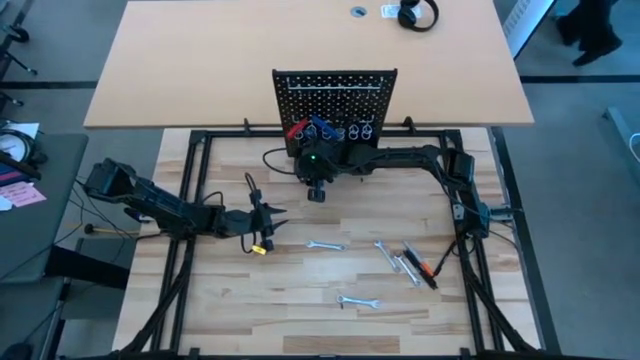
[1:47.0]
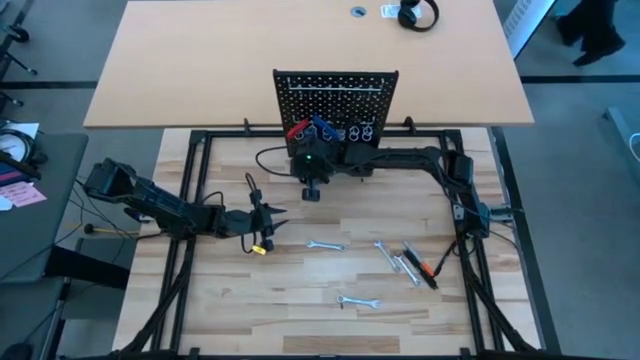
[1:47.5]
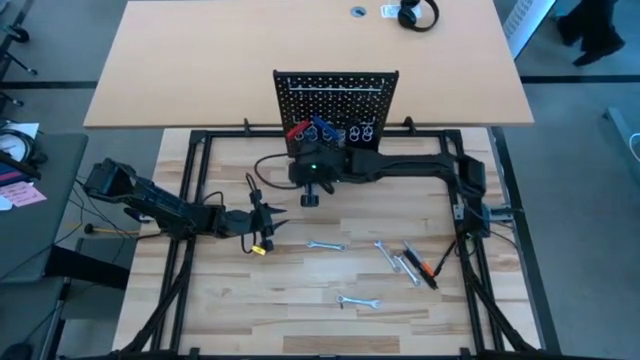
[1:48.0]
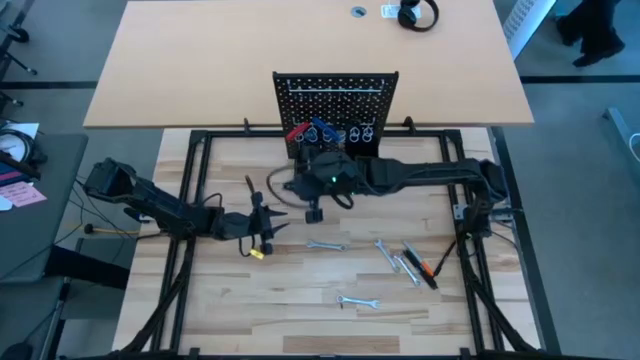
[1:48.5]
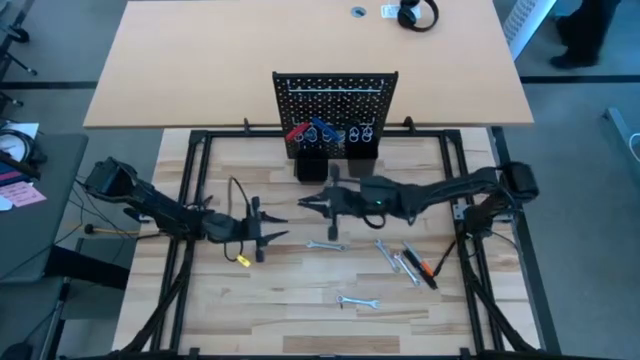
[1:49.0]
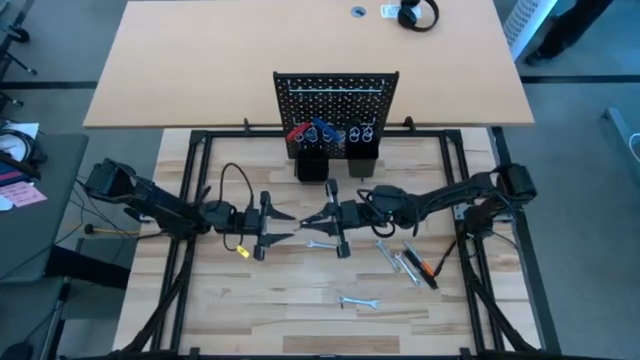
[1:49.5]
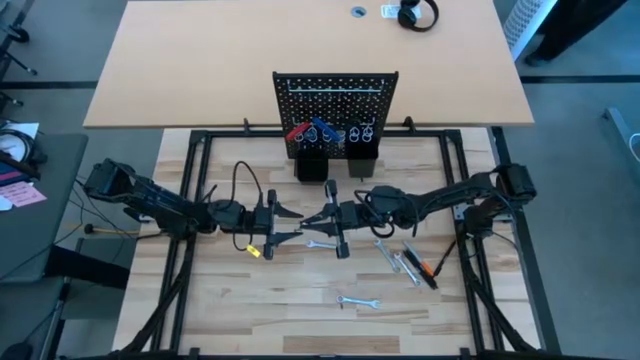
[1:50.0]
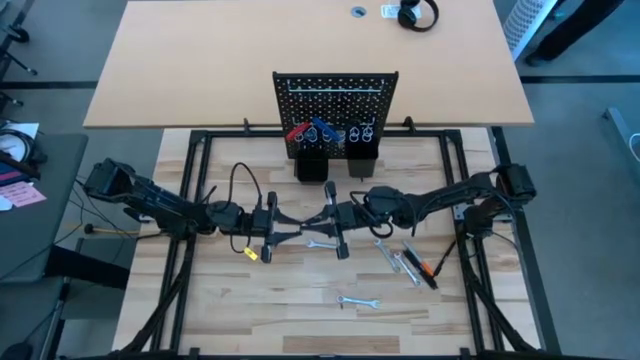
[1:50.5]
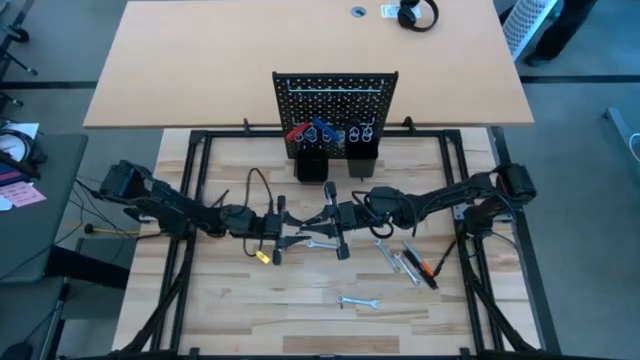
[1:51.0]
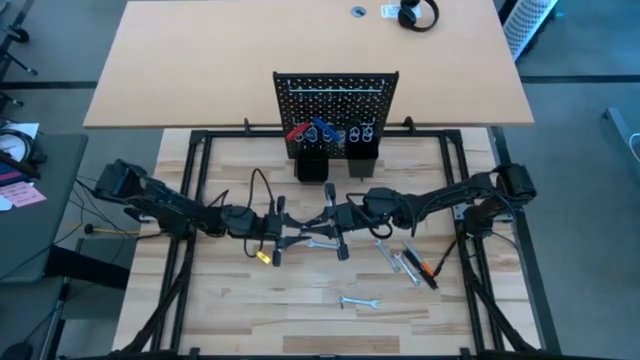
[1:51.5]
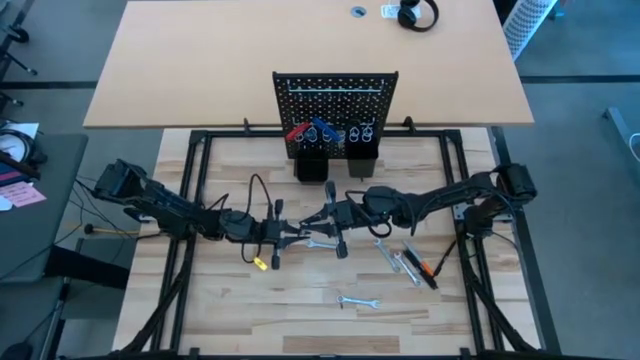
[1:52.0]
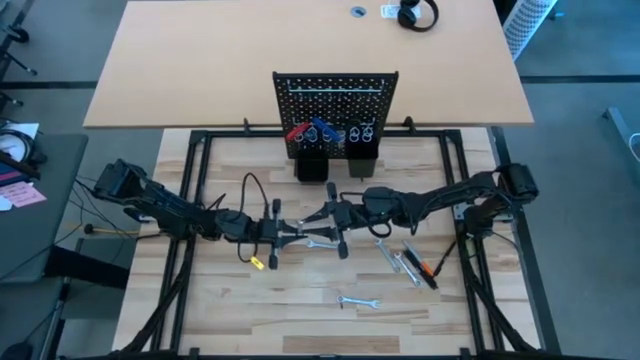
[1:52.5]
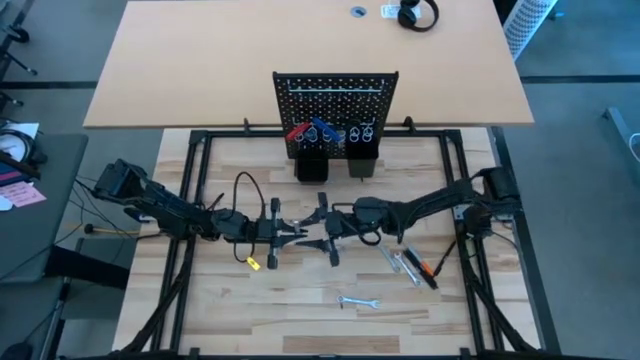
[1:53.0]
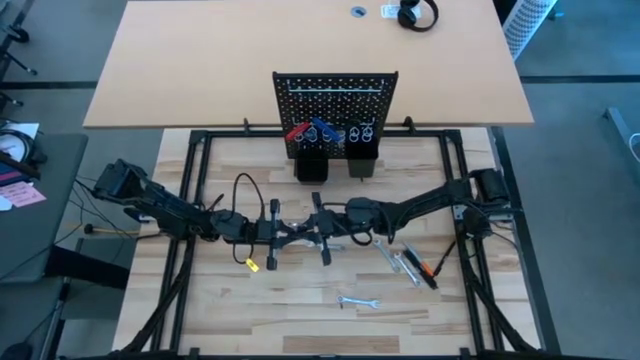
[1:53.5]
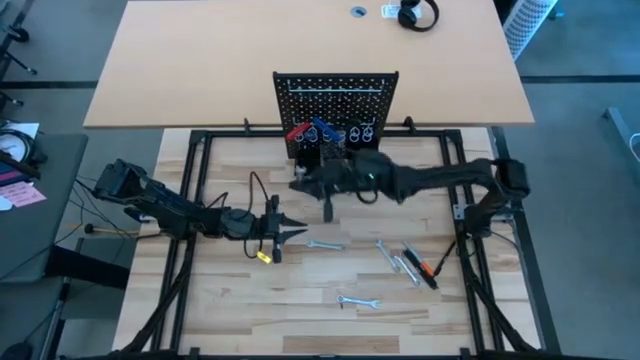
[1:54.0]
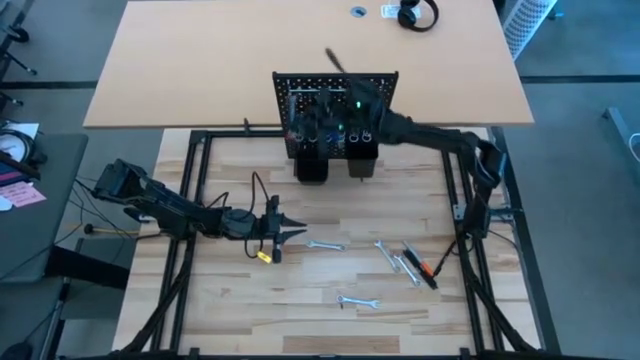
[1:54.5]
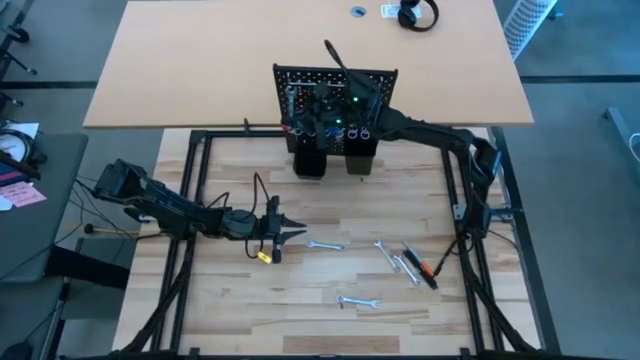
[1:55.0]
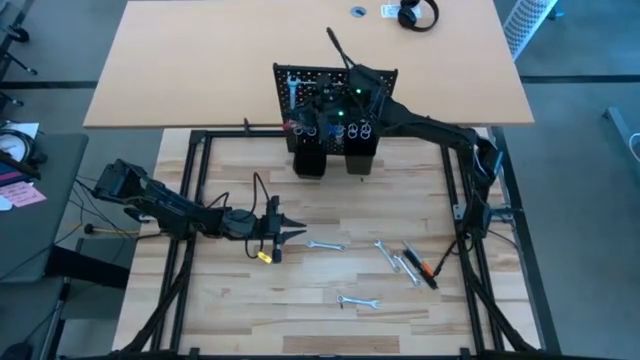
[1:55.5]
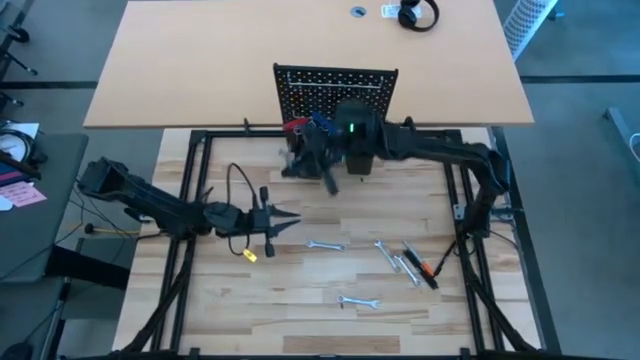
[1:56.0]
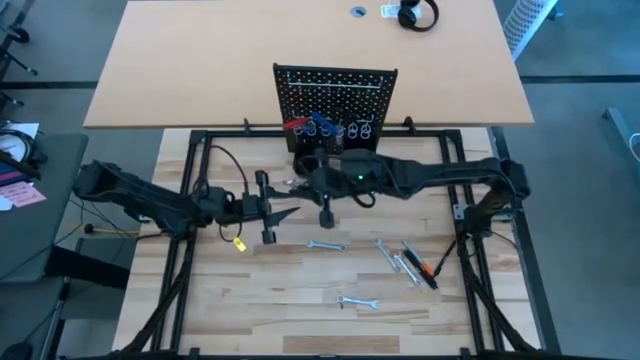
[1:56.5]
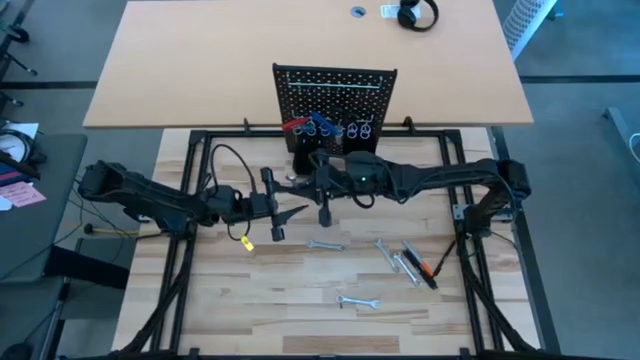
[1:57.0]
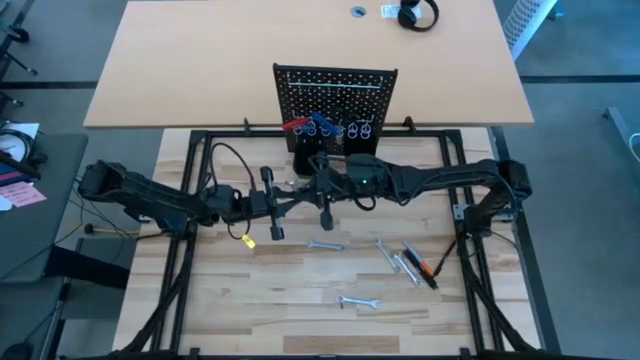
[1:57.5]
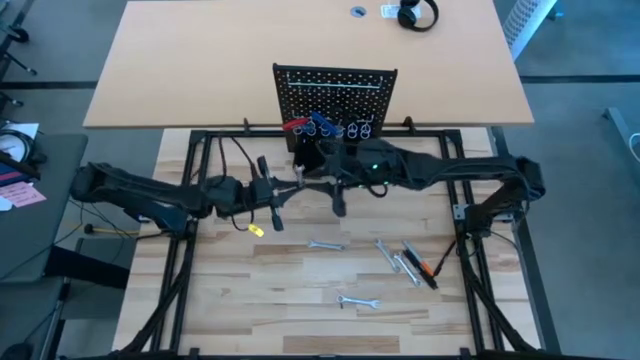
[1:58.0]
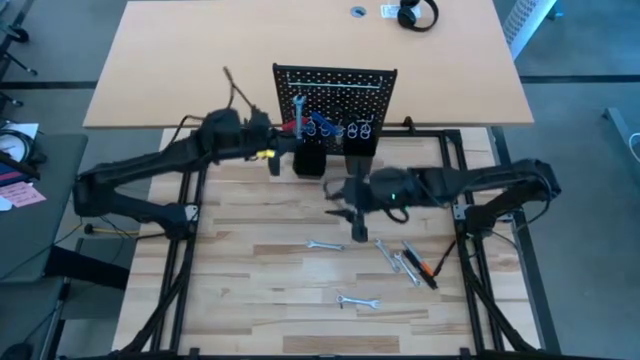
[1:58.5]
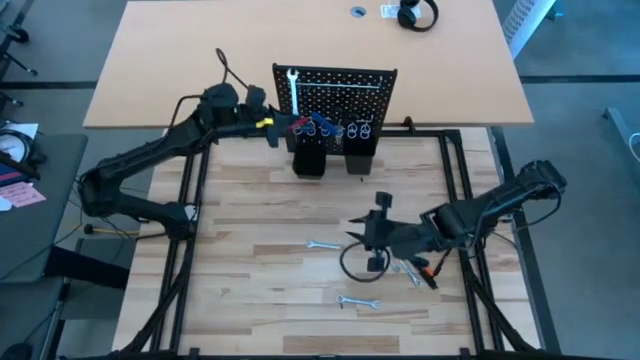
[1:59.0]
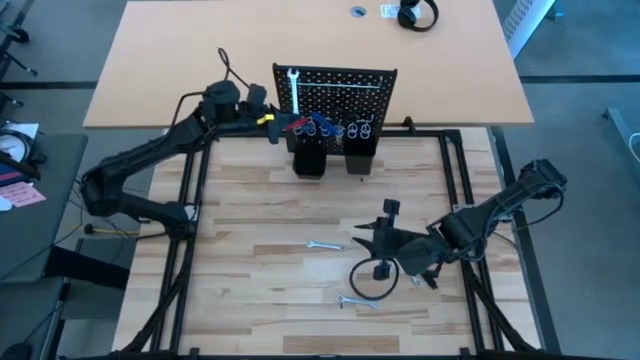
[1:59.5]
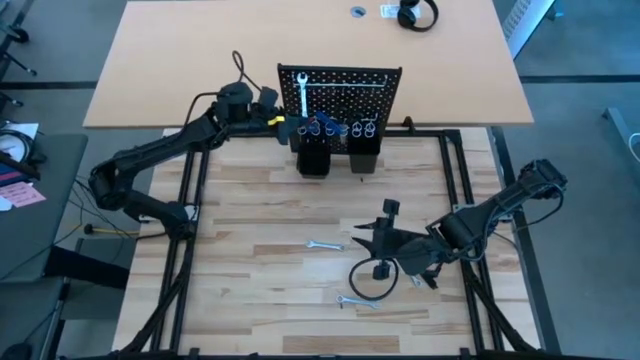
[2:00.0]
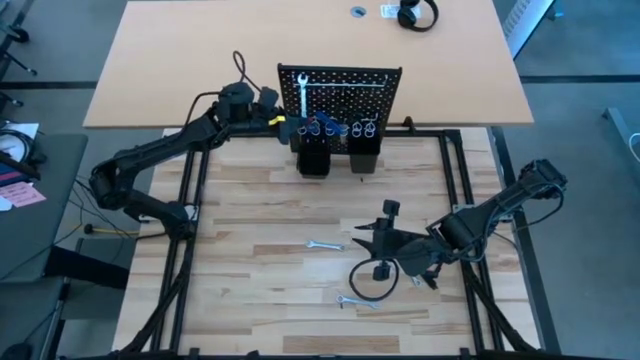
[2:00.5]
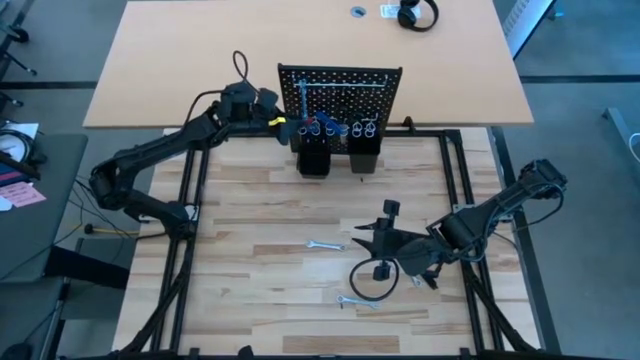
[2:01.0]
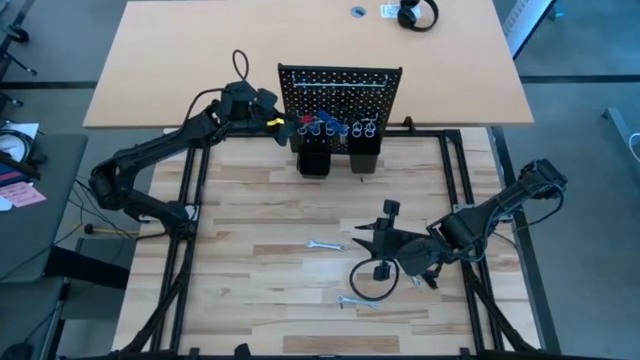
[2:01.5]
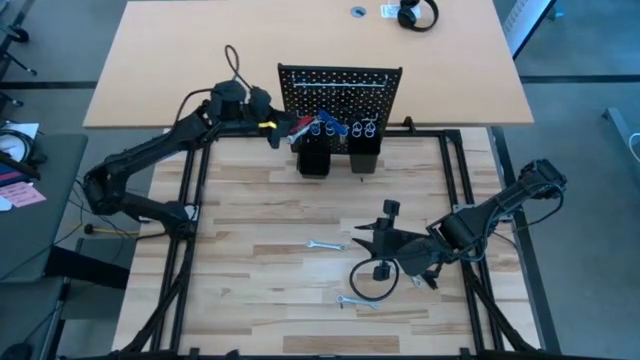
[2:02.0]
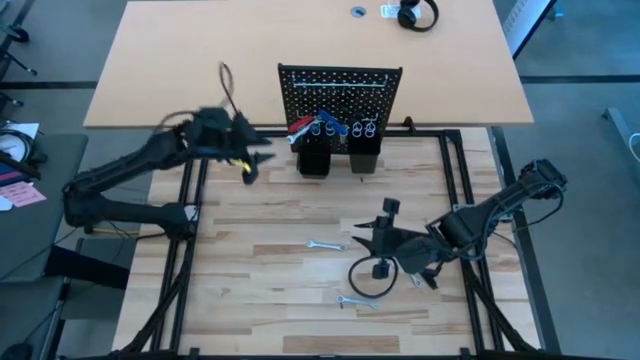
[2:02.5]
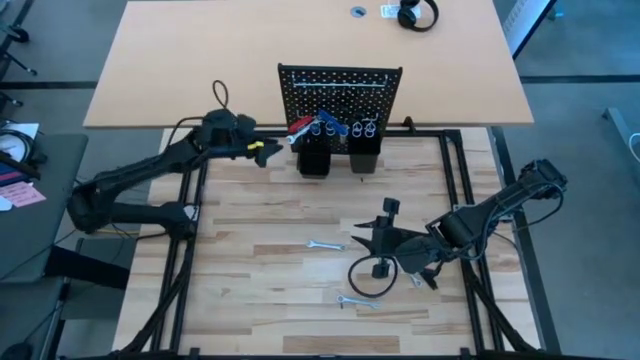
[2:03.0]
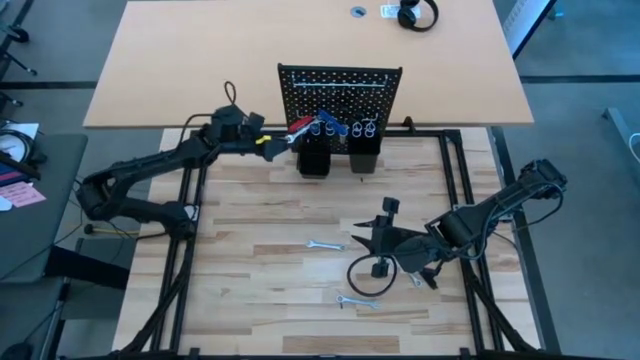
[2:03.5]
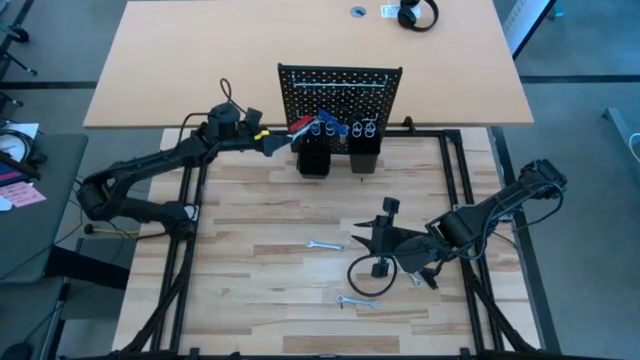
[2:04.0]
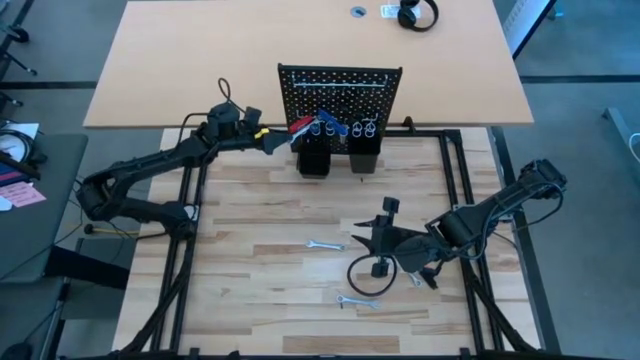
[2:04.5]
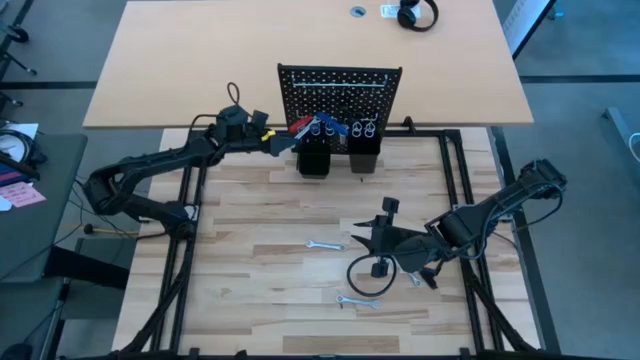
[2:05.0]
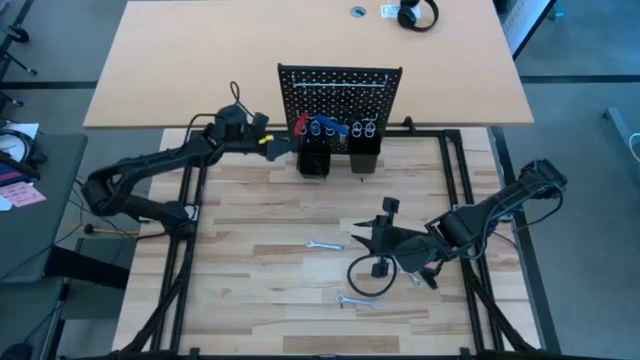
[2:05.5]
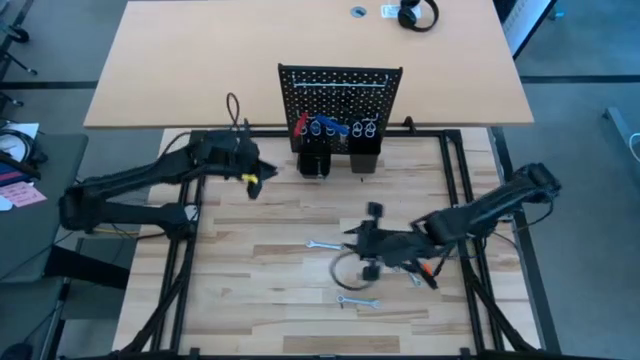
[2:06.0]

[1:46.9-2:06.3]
Task: Hang tools onto peg board
Hang the wrench on the pegboard
